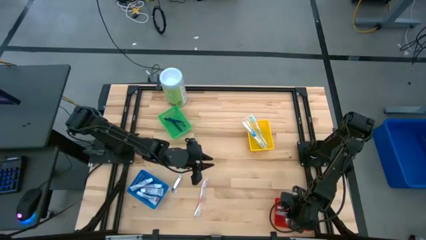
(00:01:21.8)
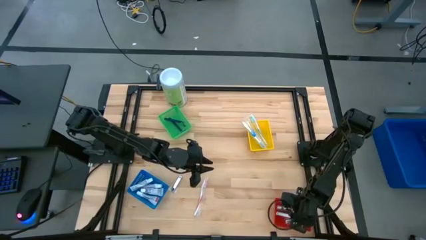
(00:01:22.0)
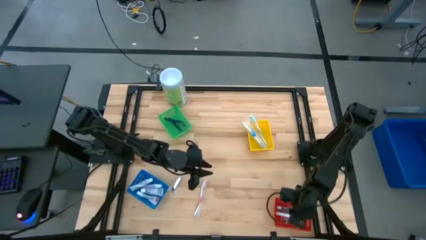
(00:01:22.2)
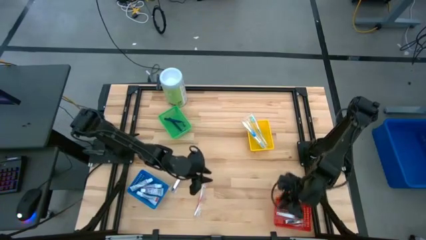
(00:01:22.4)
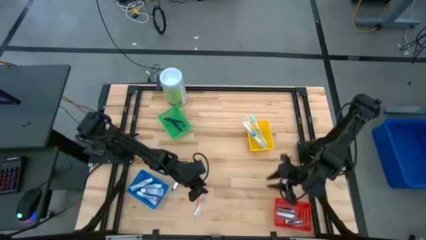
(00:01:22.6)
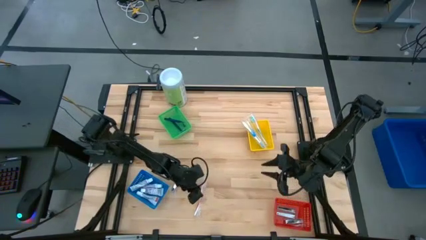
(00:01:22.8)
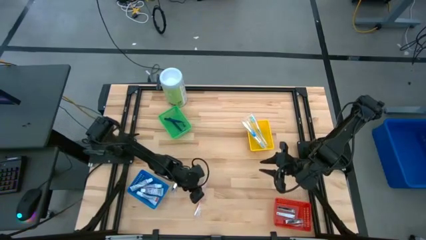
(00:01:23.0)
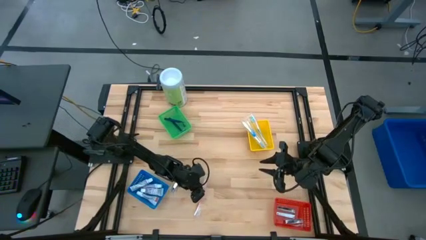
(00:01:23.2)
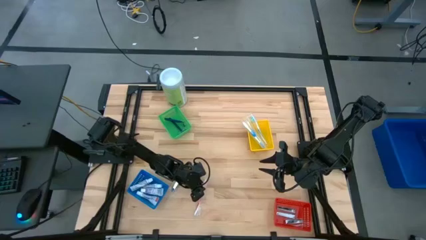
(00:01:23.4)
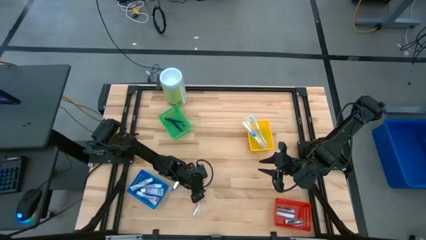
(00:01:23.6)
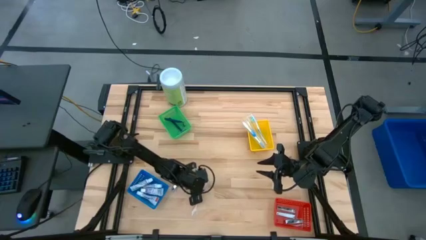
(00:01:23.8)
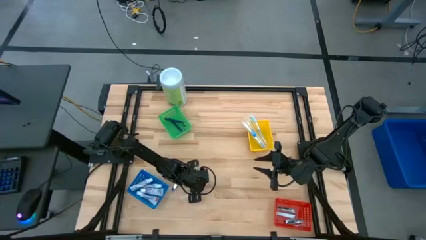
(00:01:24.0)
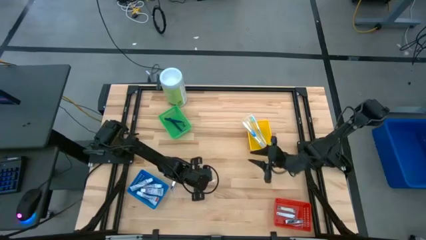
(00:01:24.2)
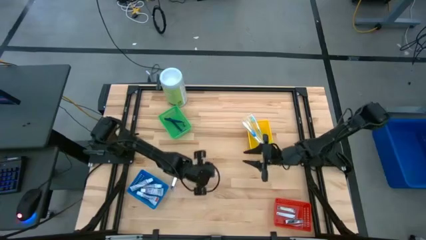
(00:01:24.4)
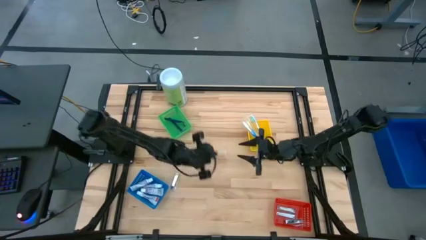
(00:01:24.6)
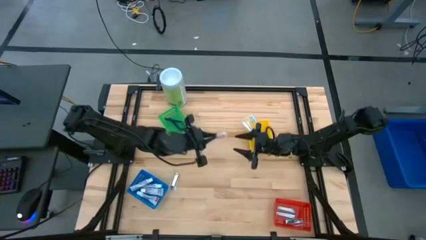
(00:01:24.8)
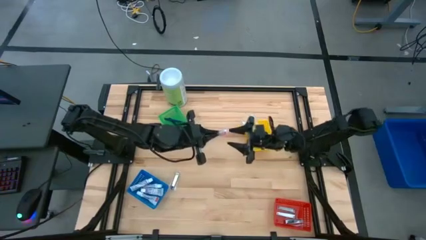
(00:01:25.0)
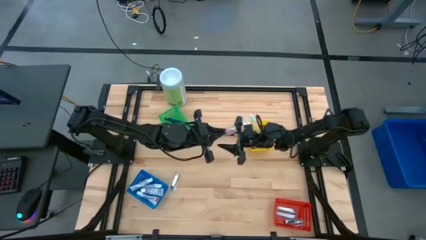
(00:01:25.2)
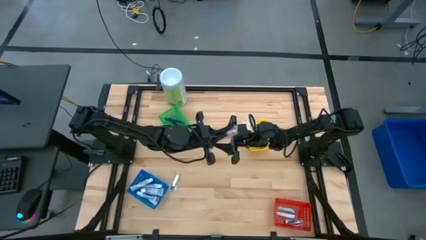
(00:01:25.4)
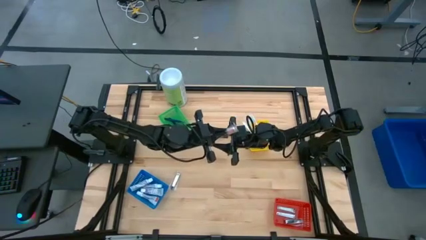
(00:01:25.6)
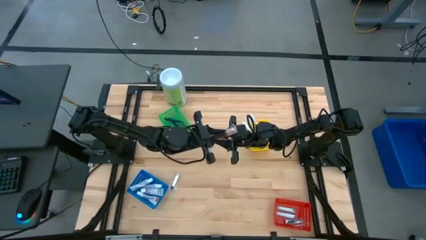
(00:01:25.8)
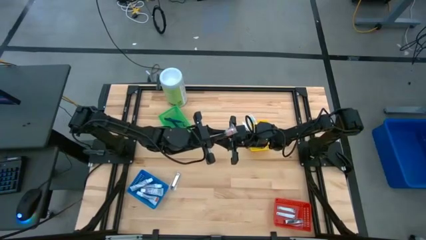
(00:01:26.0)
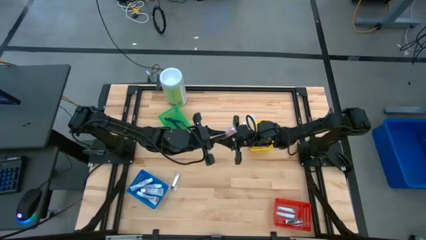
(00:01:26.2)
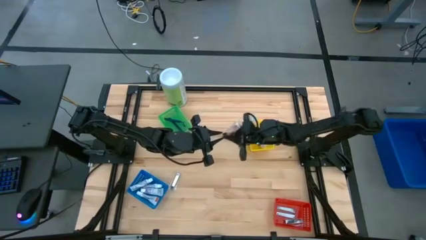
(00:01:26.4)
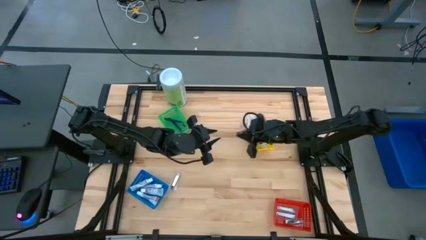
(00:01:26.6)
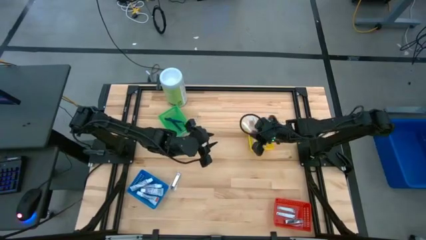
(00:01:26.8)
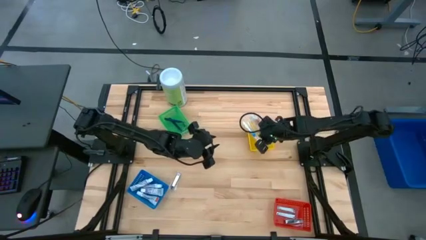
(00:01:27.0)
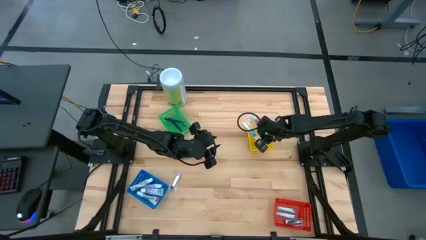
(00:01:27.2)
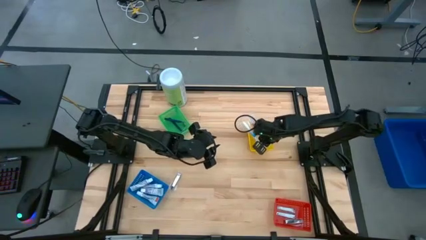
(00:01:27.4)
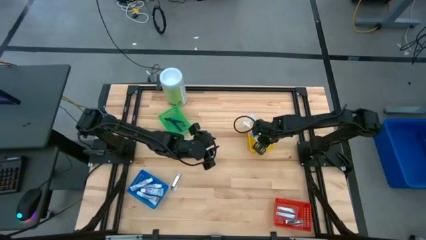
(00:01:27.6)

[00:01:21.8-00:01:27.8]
Task: Pick & Place Travel size toiletries
Put the red toothbrush into the yellow bin

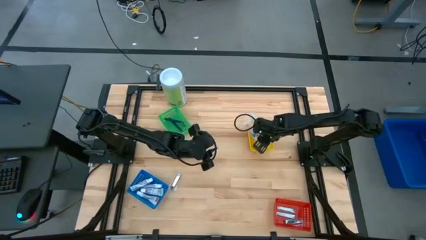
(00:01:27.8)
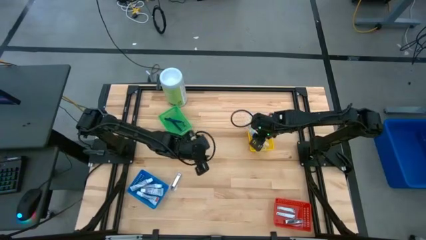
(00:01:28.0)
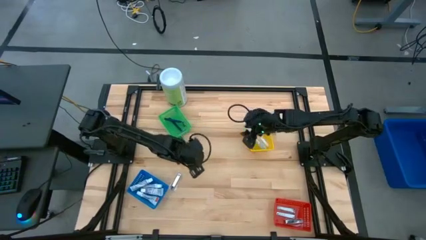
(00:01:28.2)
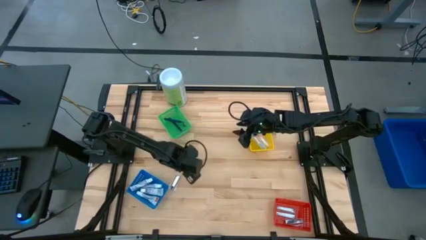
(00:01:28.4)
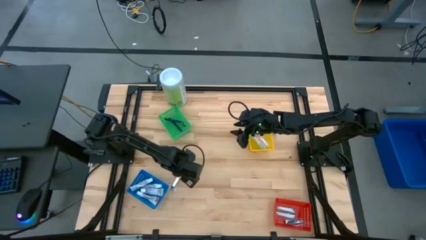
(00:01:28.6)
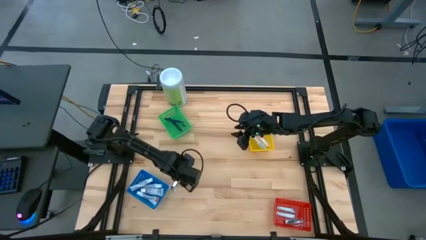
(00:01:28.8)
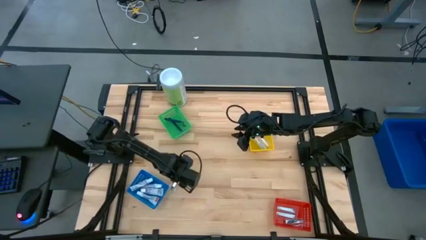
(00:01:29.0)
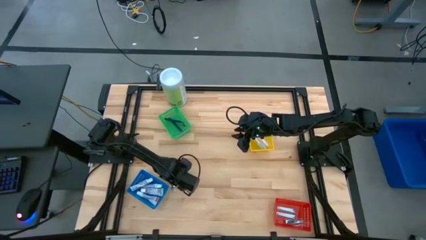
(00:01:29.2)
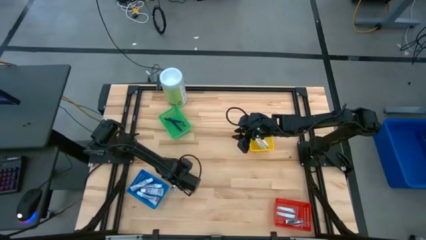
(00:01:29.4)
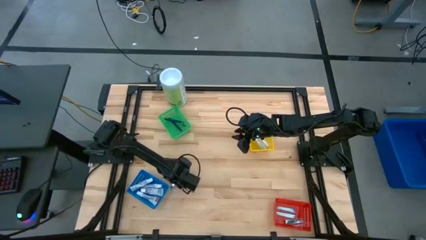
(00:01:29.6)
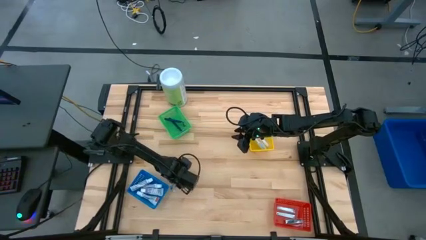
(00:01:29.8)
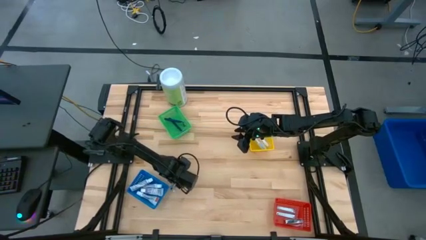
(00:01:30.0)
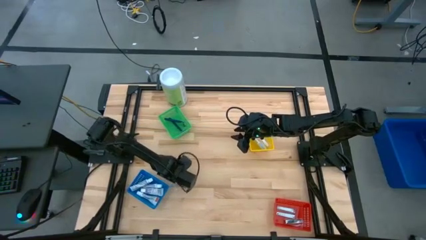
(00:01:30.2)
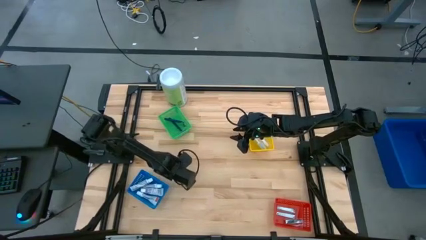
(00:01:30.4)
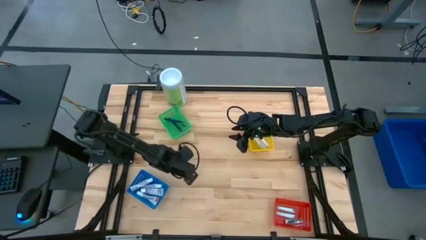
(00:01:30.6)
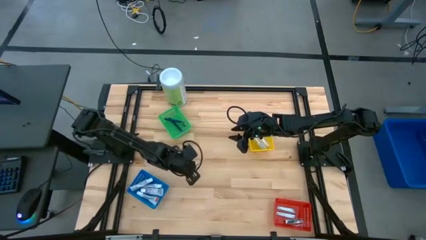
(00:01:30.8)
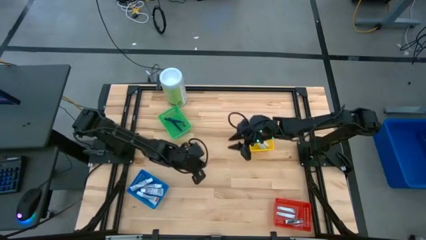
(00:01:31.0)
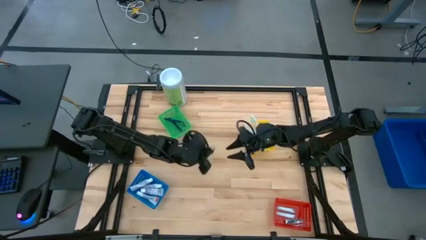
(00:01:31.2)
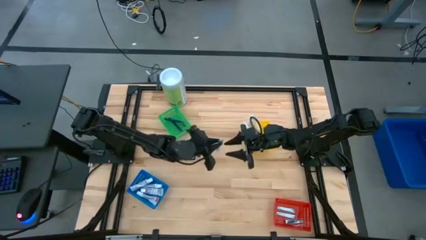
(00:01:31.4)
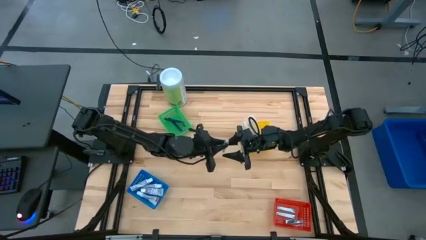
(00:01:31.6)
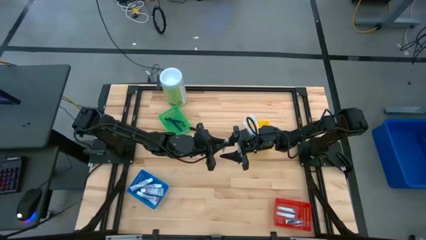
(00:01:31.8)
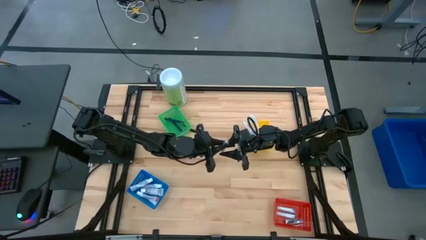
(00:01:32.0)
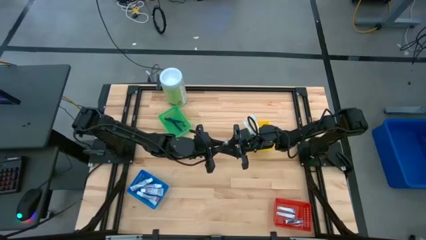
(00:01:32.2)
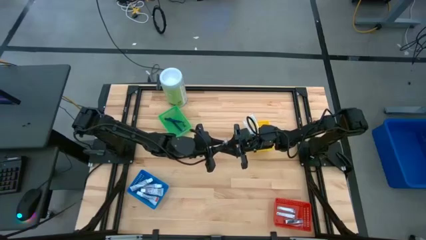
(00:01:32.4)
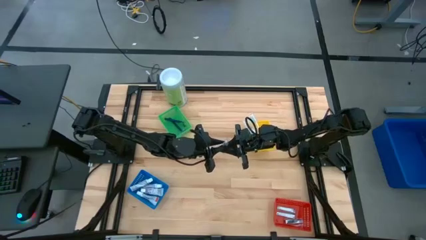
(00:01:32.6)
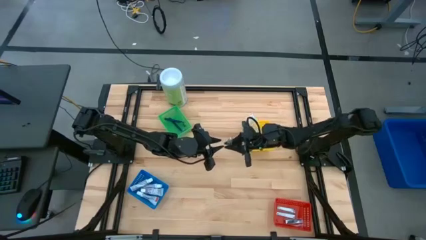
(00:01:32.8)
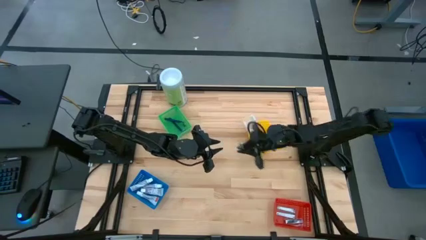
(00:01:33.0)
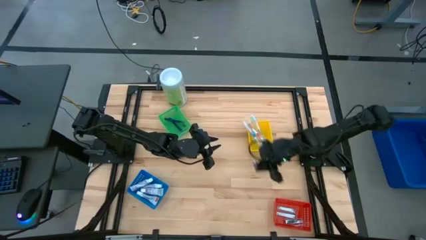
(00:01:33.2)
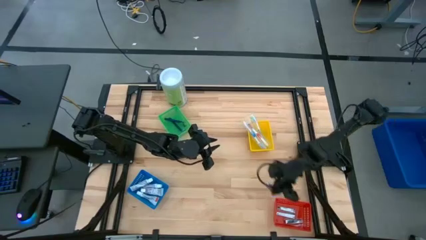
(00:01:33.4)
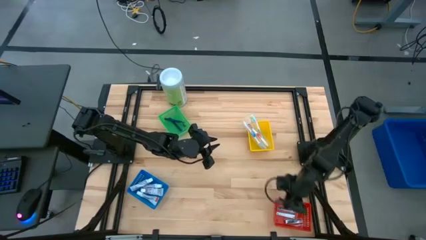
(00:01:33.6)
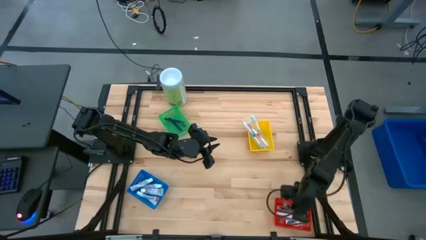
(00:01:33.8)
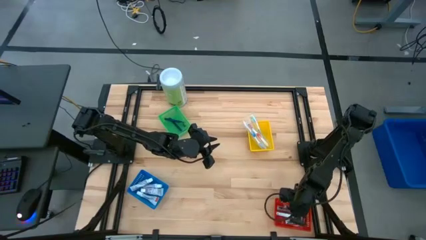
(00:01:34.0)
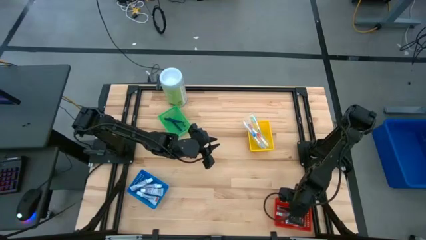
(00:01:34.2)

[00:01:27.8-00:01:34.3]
Put the nail cutter into the red bin

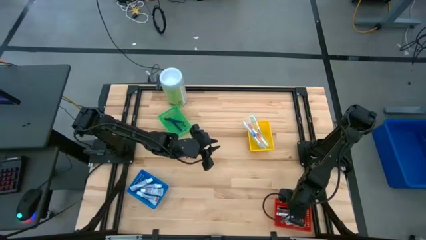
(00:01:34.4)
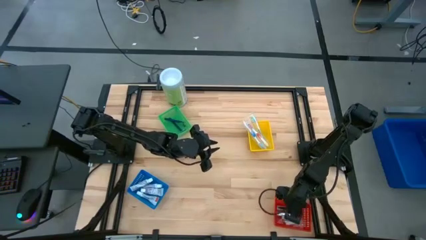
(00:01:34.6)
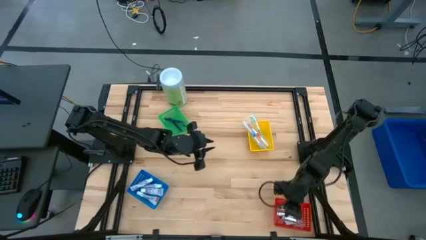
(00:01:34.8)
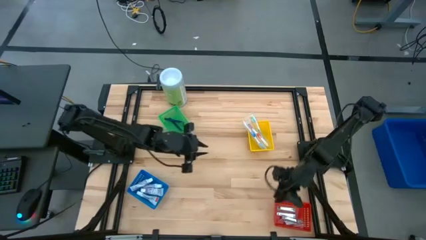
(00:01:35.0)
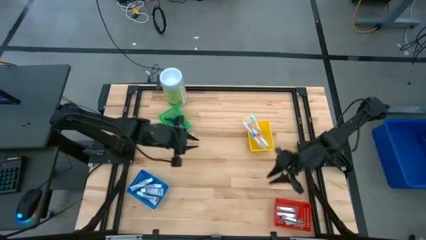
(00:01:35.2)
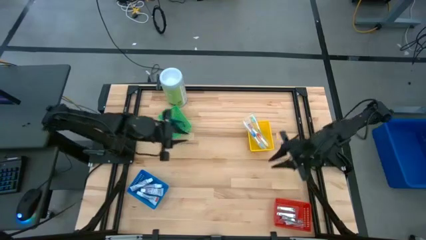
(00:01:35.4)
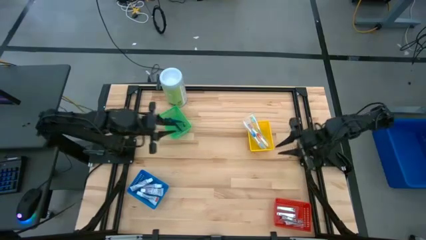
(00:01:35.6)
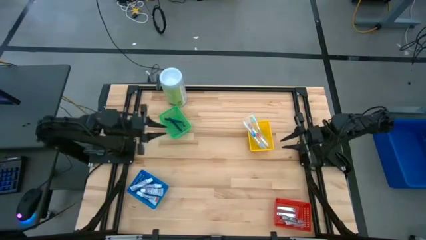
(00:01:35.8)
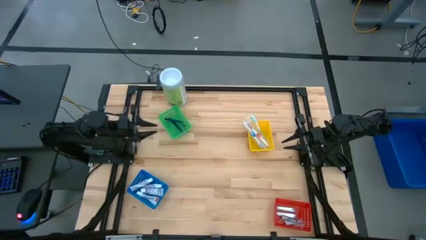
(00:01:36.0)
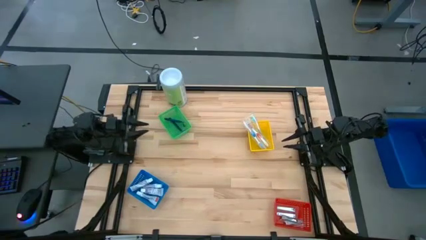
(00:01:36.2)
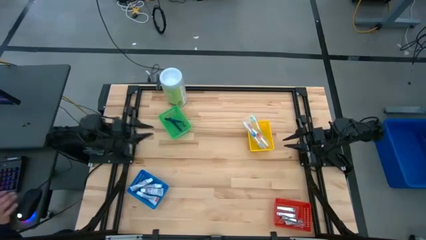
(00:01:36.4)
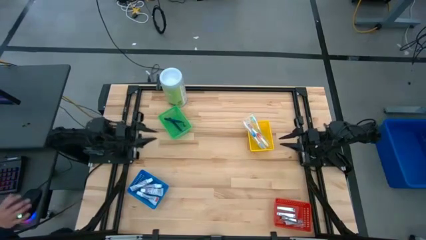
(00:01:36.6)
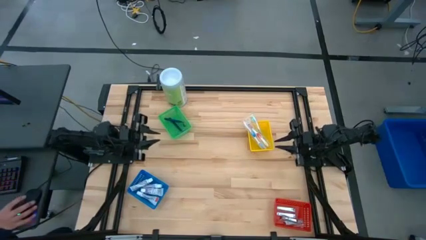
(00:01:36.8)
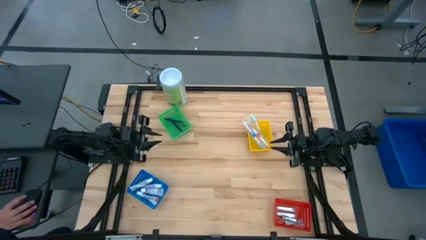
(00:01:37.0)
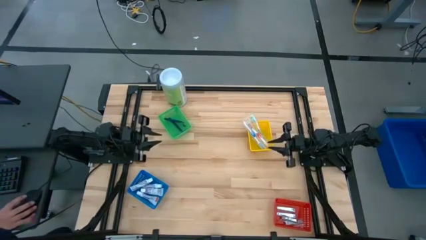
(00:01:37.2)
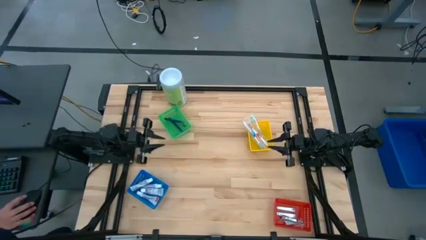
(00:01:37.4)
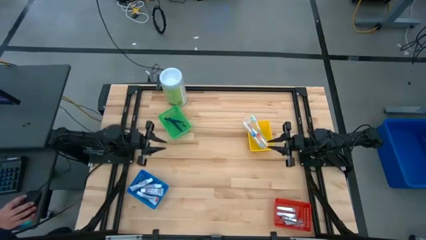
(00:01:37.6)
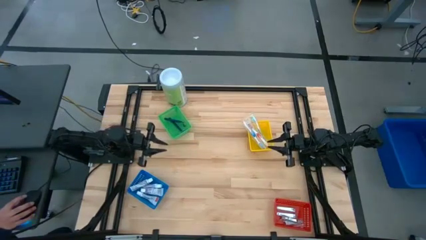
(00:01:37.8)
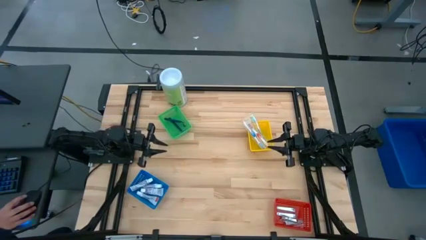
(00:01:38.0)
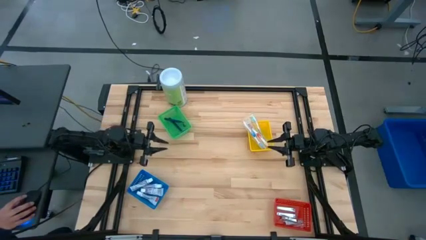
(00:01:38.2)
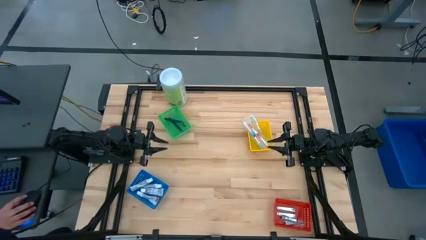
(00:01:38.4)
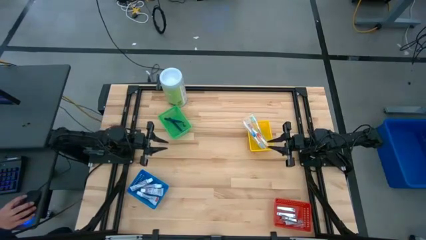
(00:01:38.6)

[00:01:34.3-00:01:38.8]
Return to Home Position
